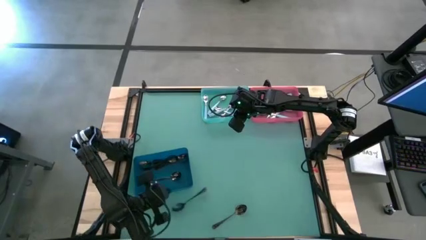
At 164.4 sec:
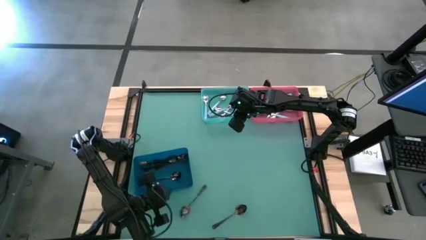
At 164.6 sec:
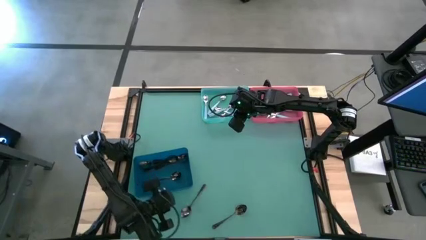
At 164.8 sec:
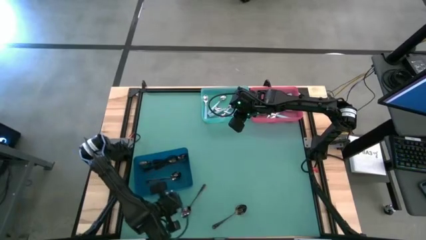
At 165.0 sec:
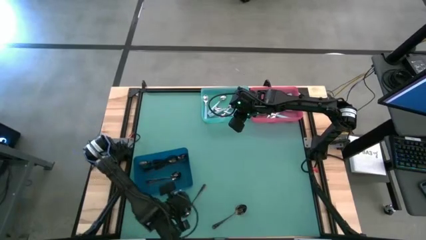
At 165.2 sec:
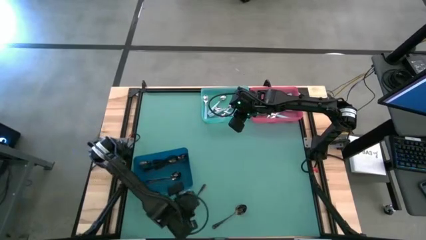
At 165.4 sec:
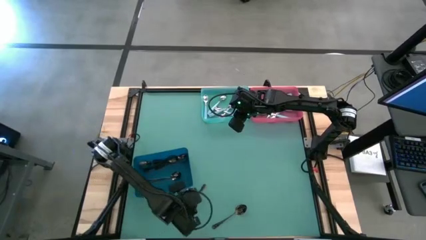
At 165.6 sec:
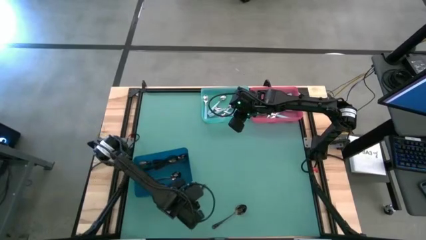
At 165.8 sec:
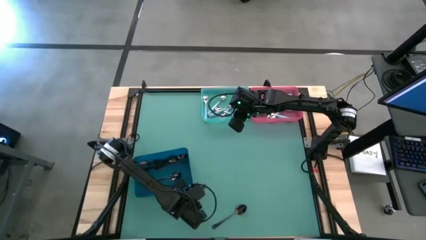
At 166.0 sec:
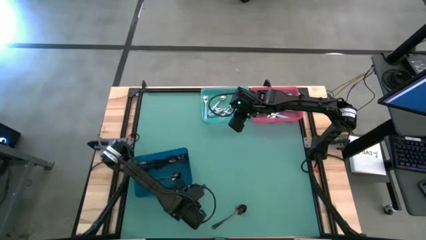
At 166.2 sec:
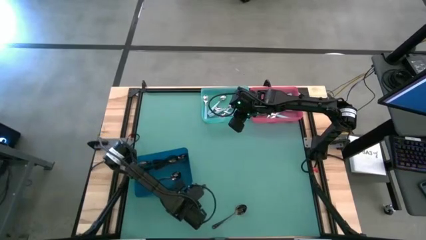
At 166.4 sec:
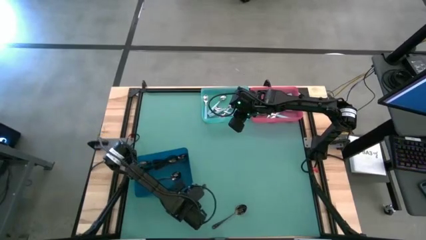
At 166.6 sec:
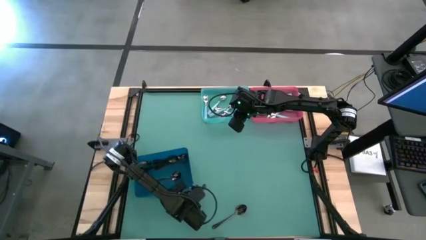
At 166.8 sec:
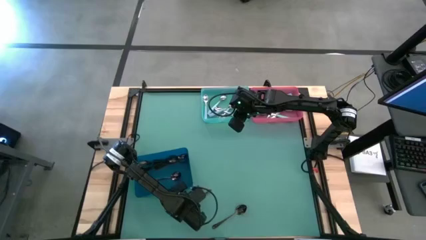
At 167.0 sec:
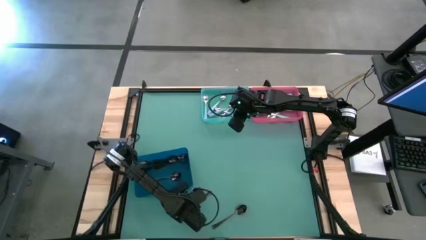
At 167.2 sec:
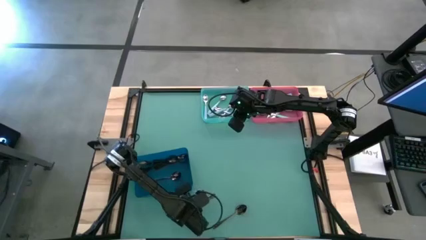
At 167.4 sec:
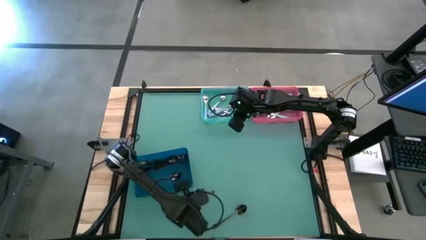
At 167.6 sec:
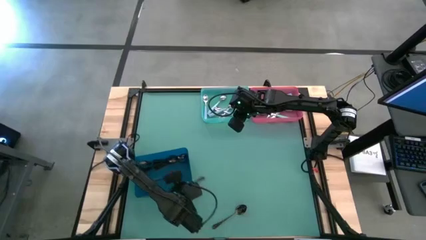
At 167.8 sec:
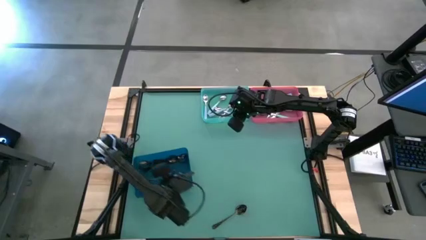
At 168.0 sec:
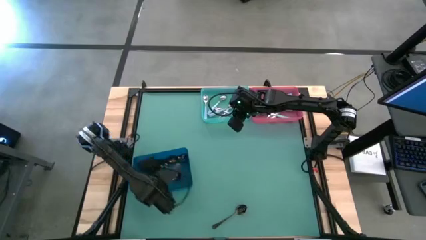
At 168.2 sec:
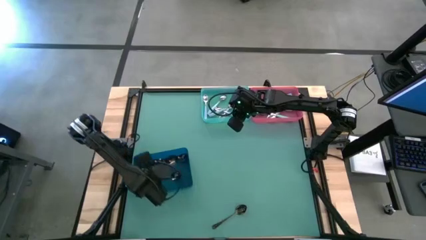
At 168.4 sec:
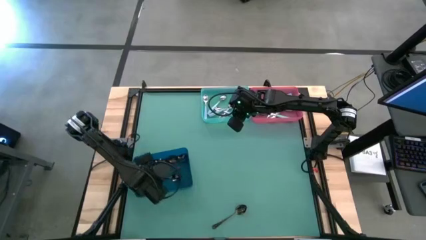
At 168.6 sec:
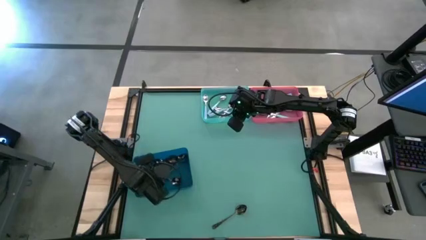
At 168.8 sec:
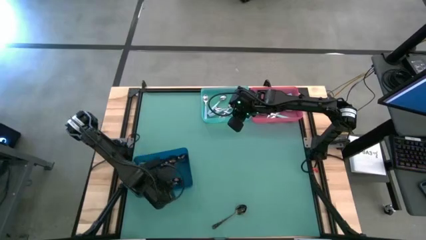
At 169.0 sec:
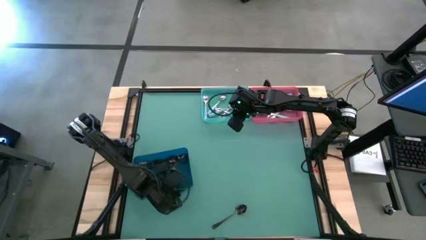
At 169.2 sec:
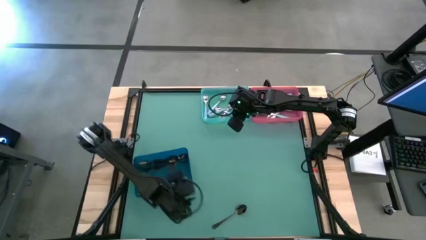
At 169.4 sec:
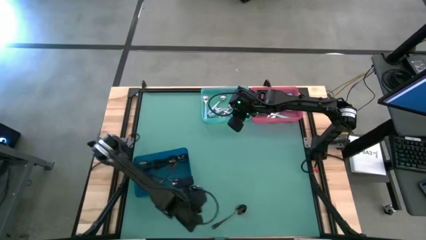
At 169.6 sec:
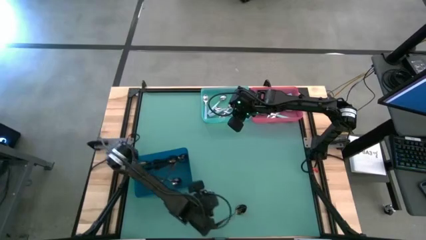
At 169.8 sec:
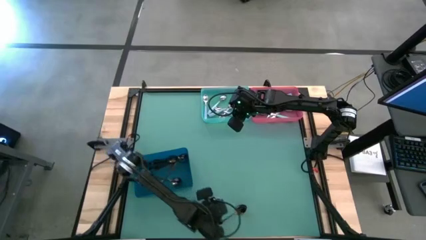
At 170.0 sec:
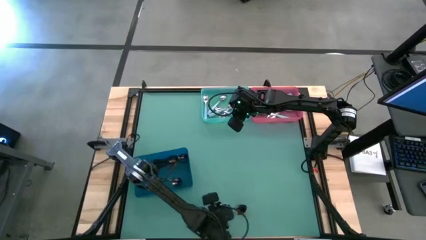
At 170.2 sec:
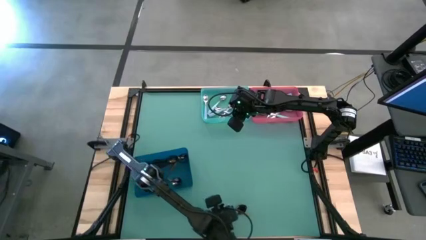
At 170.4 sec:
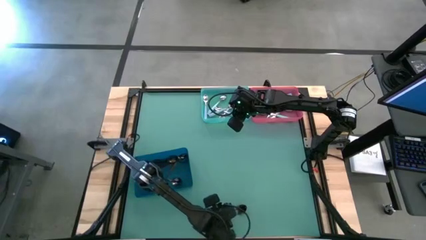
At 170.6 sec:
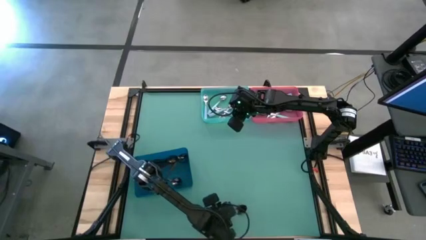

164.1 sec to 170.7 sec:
Task: Sort silverware by color (type)
Put the left black spoon into the dark blue bin

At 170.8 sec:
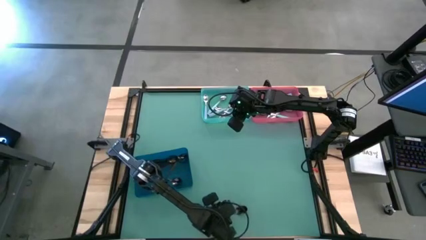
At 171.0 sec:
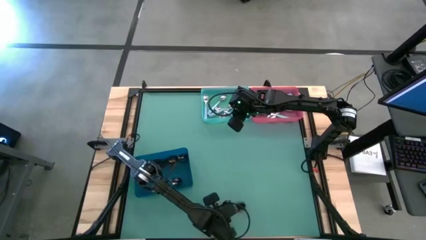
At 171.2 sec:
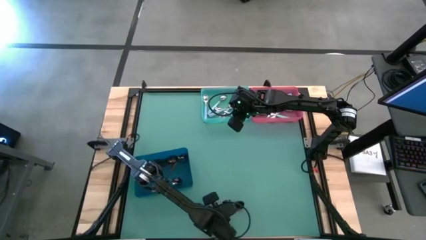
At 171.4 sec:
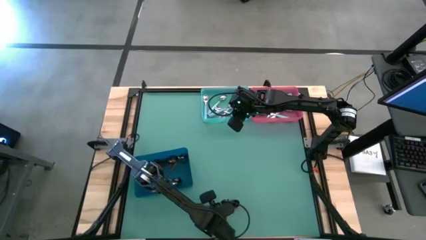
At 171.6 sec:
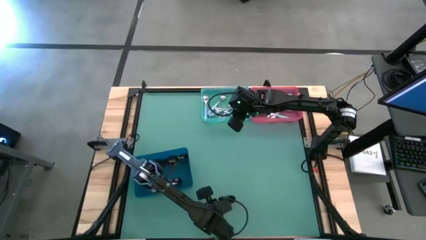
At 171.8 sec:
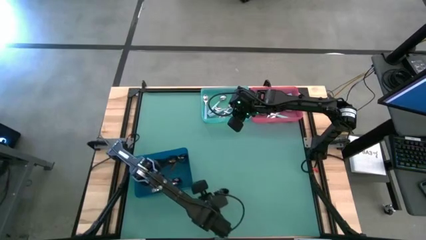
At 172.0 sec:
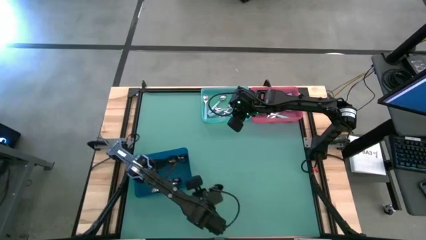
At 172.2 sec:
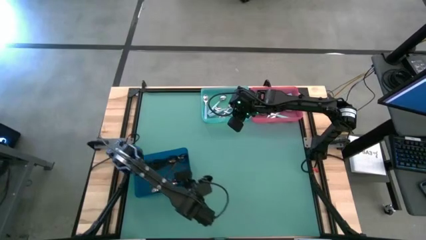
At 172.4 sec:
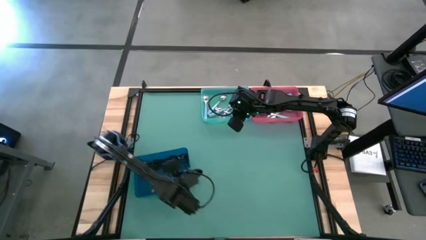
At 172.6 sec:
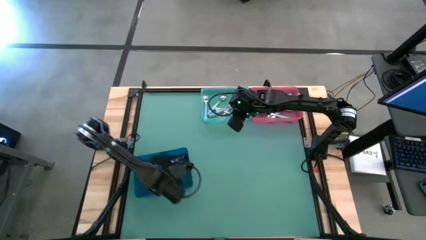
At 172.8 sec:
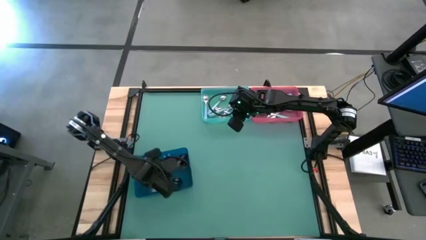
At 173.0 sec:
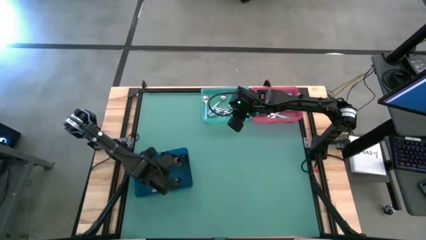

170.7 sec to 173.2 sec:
Put the black spoon into the dark blue bin

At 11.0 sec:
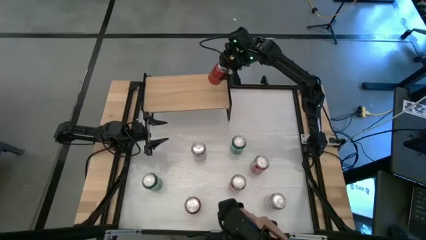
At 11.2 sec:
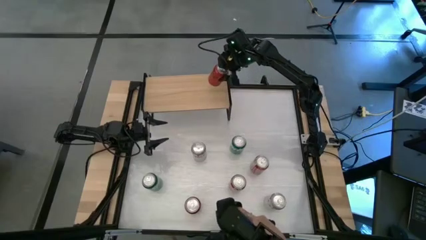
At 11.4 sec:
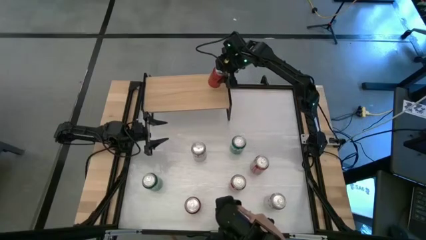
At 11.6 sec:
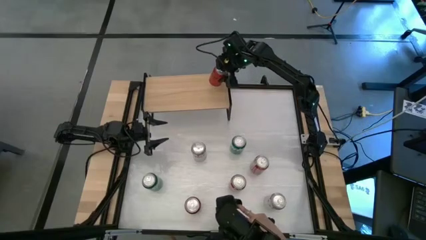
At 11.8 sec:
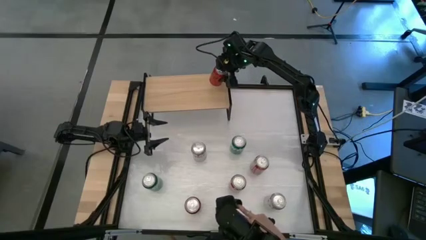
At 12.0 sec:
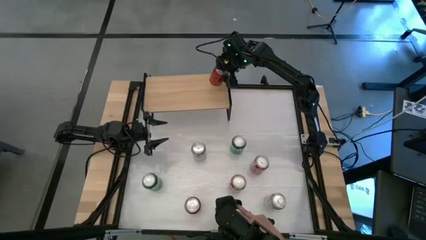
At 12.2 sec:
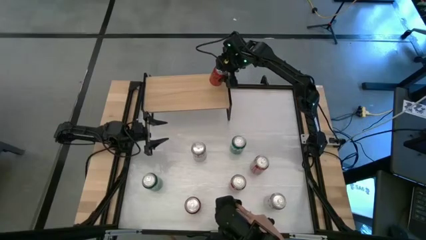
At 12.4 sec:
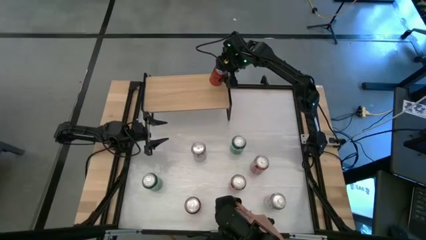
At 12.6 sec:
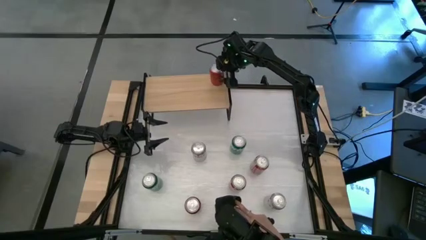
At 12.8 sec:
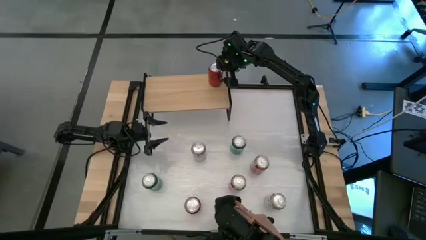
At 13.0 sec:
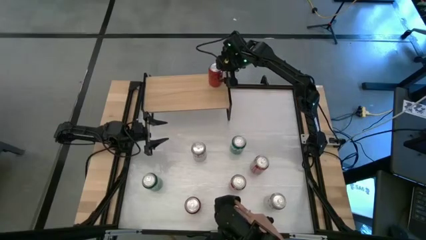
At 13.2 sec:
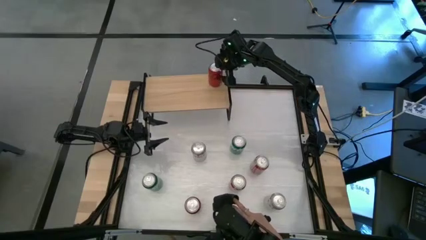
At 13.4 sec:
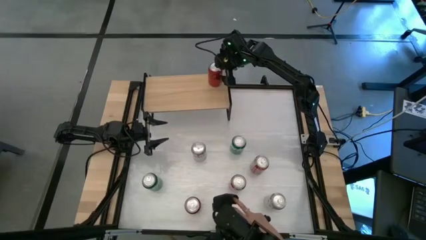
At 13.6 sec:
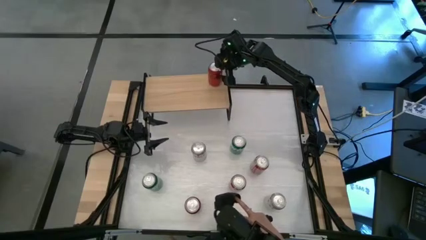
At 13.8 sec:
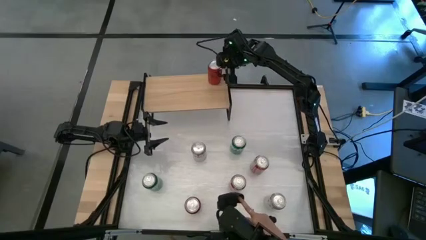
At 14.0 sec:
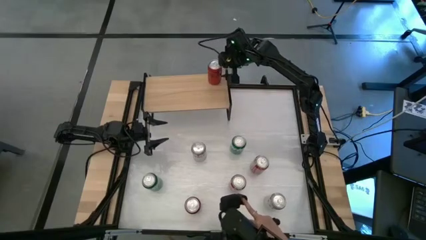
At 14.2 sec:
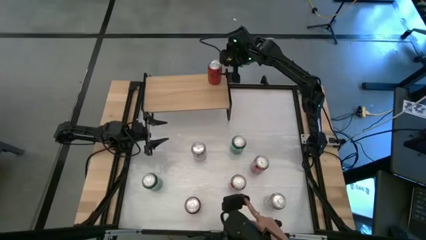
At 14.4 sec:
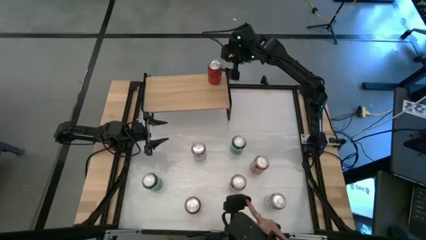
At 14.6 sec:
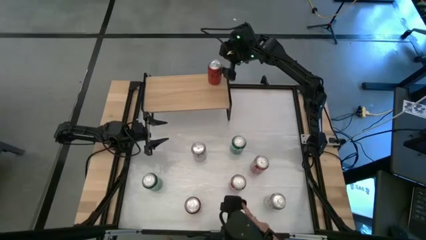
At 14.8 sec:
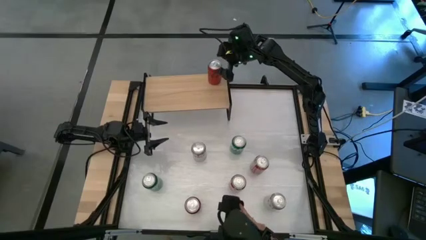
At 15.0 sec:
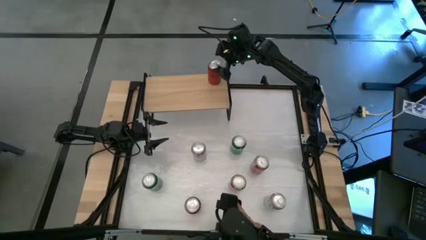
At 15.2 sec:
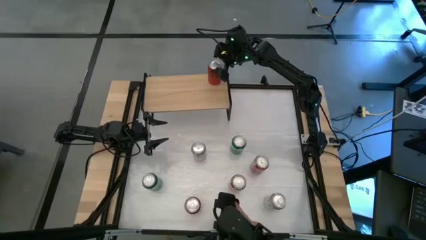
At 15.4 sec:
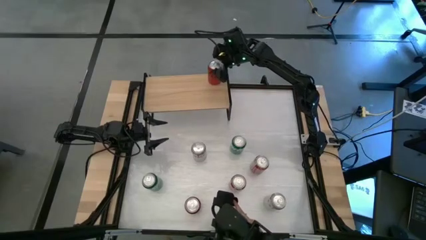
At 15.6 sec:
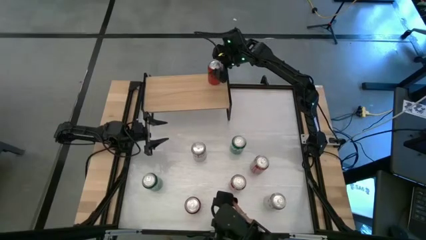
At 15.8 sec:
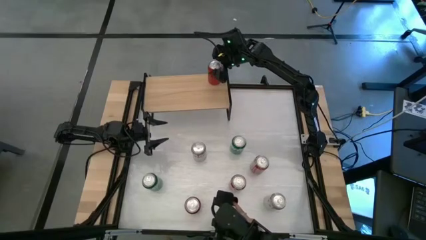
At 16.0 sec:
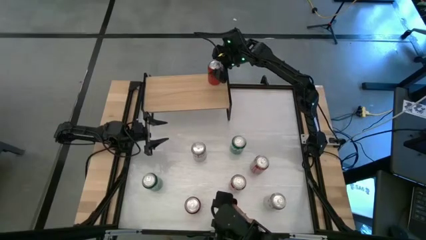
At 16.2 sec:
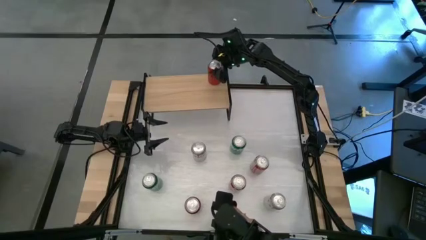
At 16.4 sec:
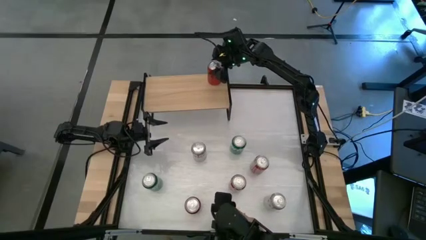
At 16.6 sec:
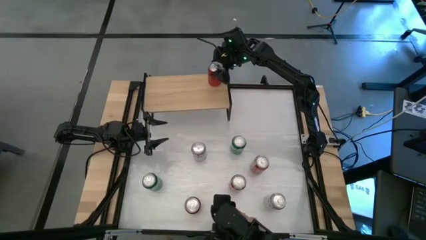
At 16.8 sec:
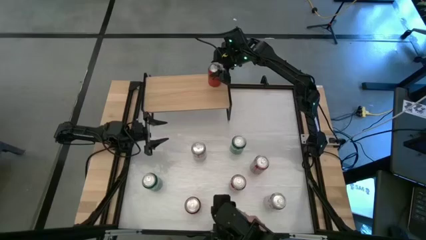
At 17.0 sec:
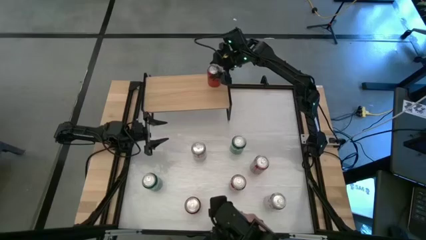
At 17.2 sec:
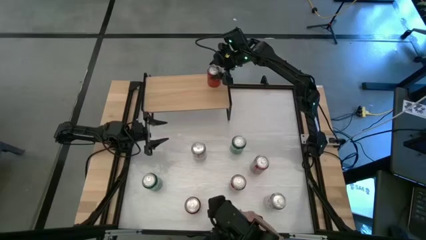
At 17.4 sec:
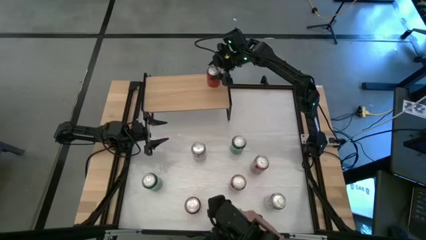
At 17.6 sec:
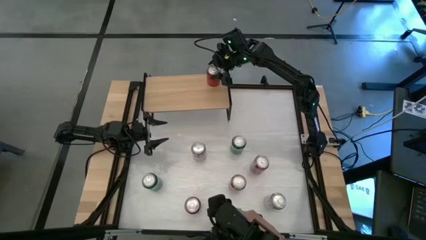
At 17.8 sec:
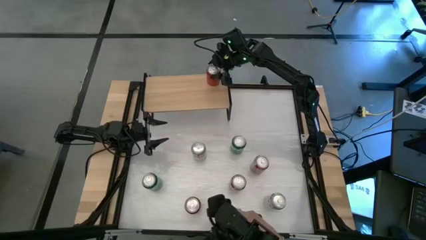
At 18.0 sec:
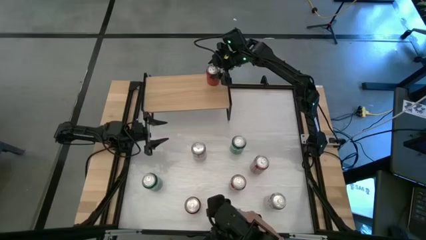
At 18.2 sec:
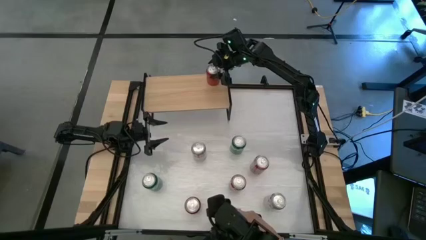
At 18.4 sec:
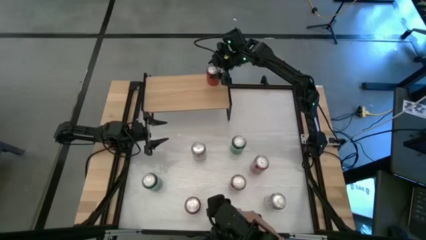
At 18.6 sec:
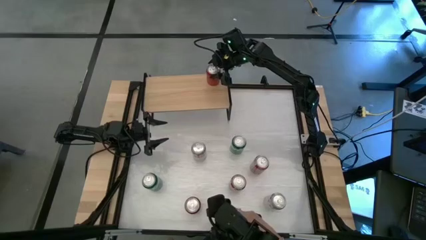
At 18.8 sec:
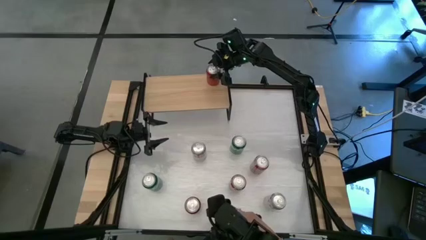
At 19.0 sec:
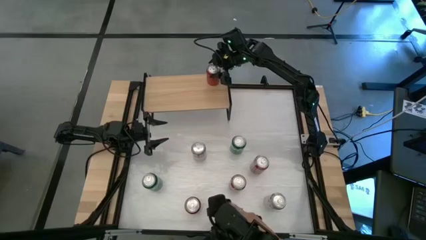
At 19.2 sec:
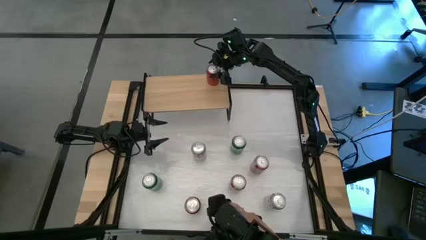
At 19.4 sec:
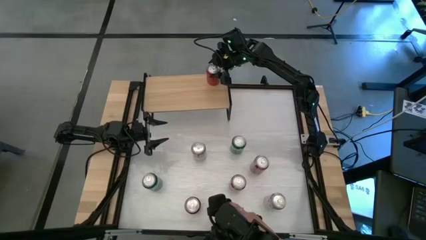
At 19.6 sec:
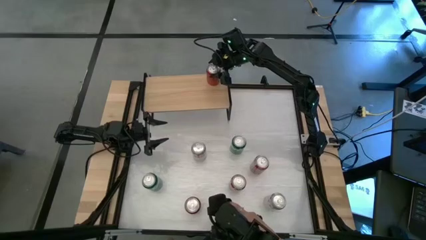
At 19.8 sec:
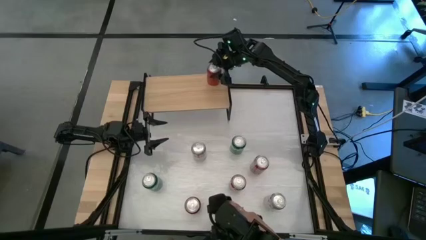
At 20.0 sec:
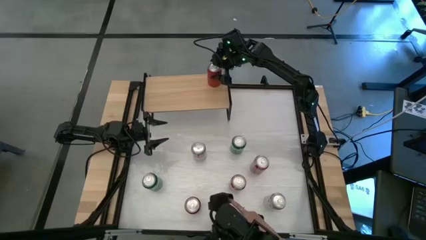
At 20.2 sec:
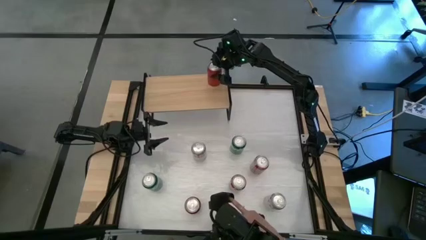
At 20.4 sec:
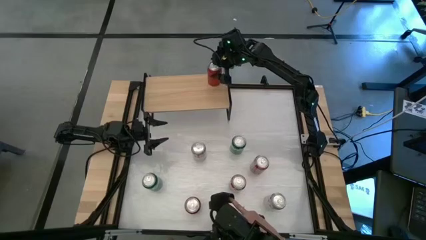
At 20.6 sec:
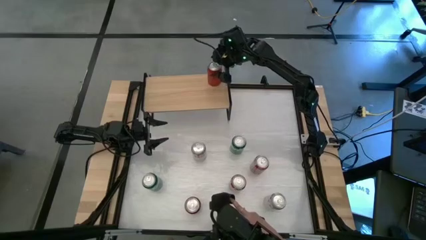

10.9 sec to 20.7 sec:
Task: Place canned beverage on shelf
Put the top red black soda can on the shelf
